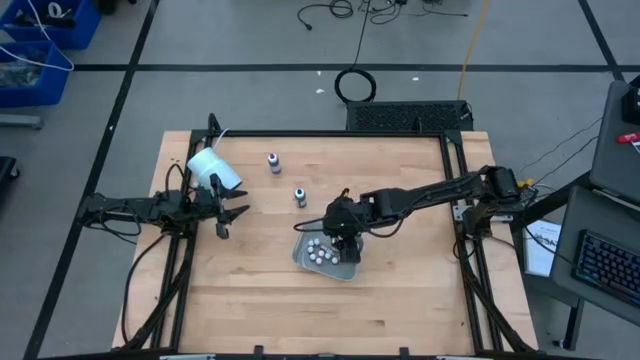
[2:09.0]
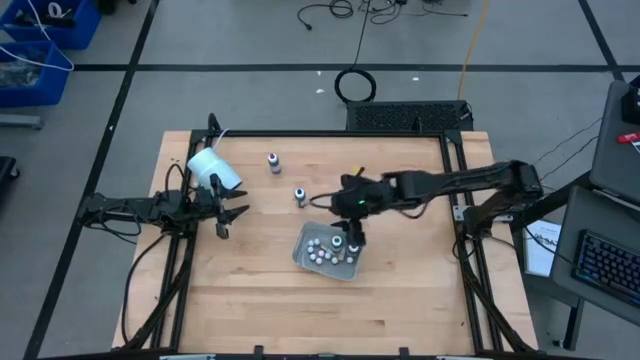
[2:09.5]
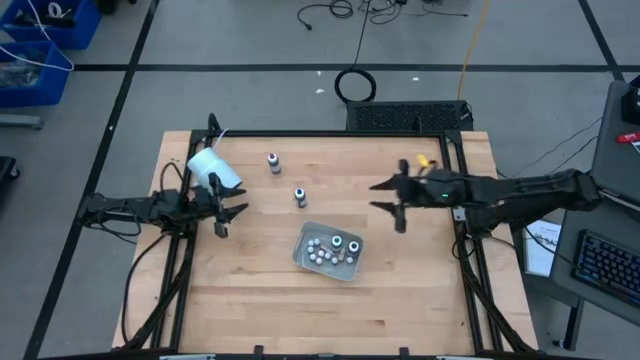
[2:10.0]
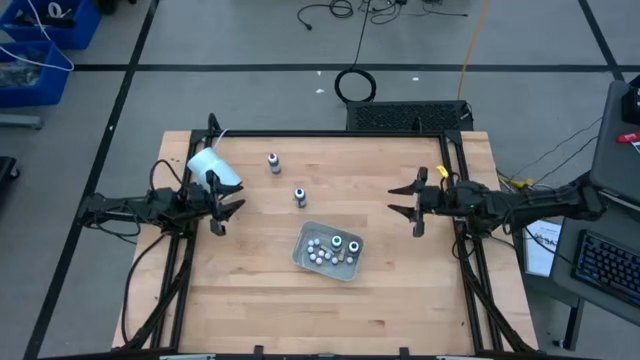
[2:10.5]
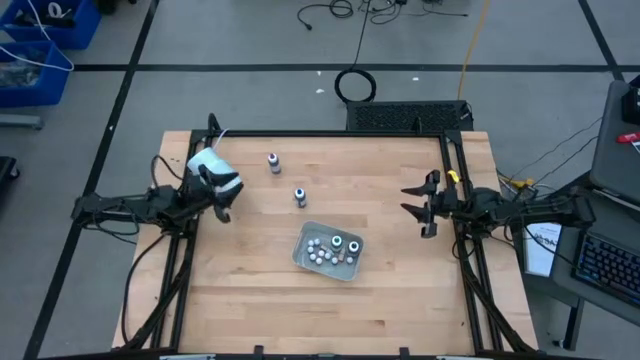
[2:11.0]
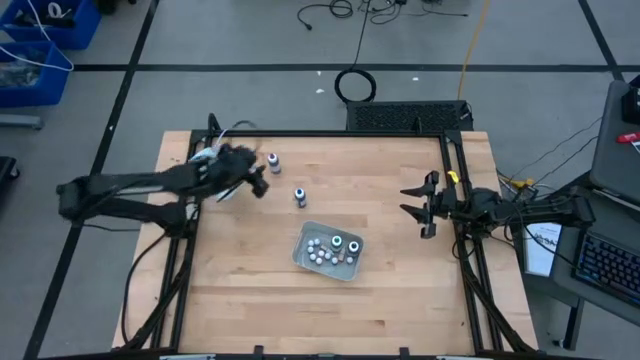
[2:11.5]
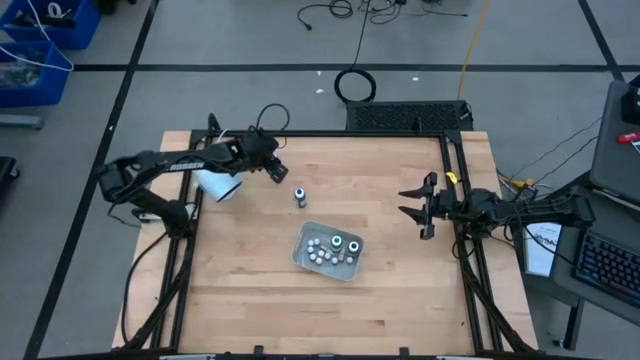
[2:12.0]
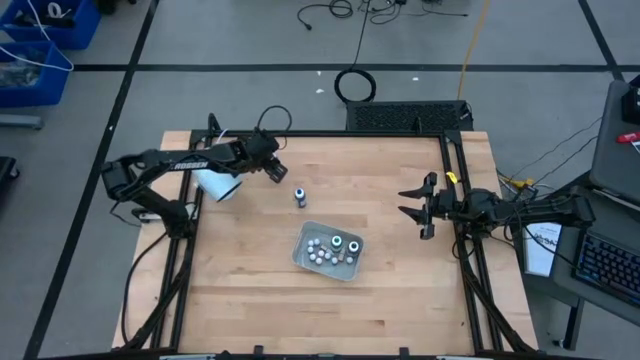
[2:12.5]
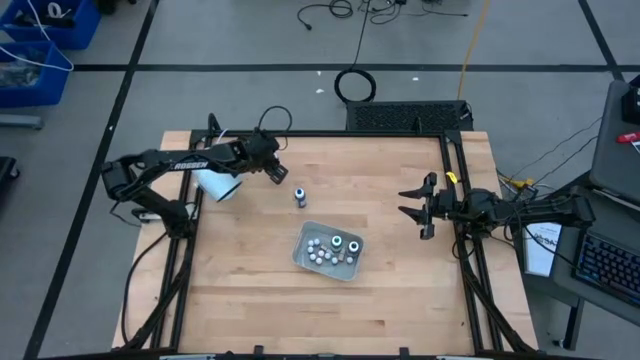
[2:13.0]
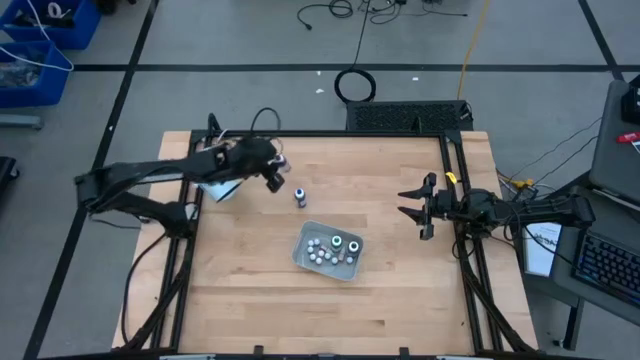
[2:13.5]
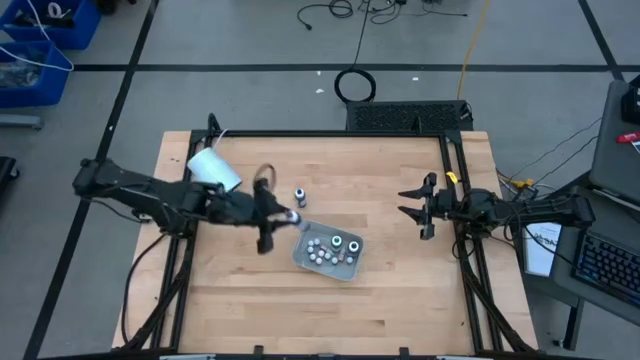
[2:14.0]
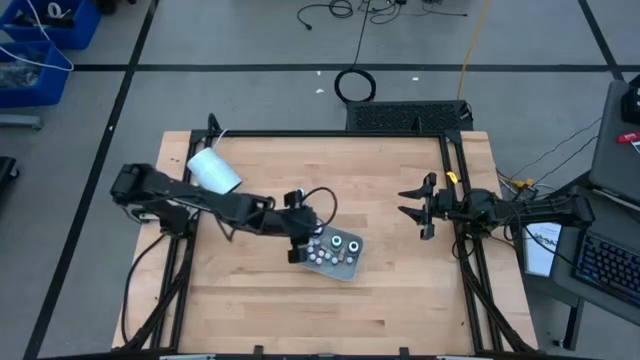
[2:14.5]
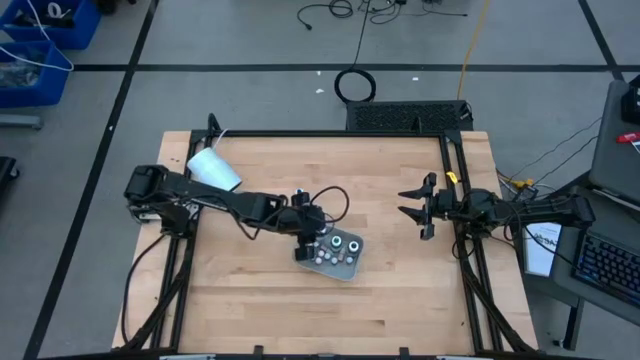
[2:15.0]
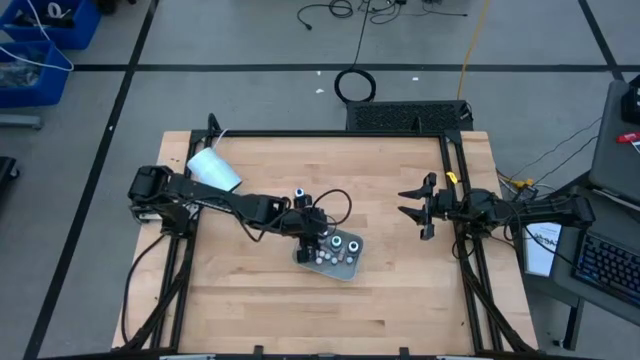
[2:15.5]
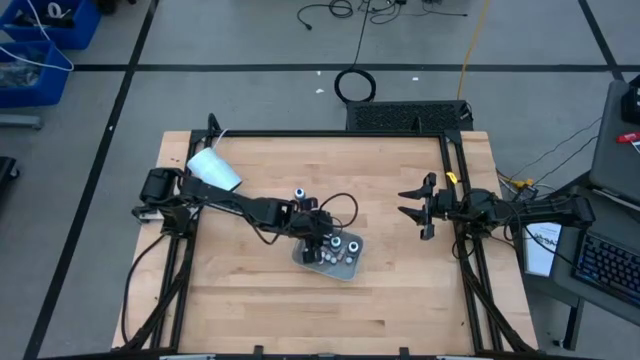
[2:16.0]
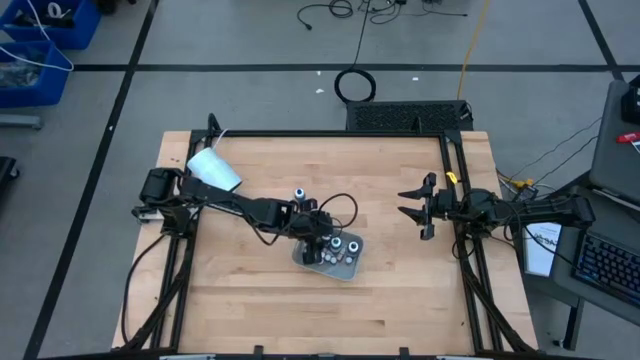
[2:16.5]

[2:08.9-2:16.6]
Task: Pick & Place food coloring
Put the purple food coloring bottle into the bin

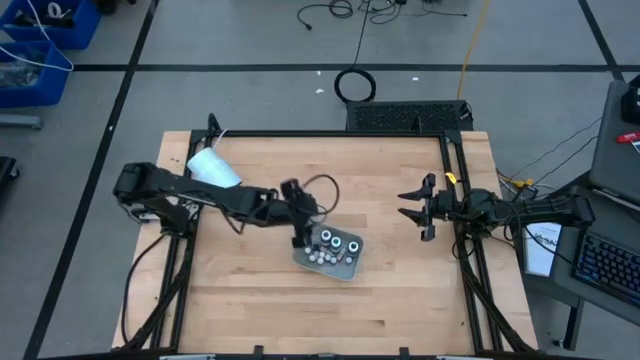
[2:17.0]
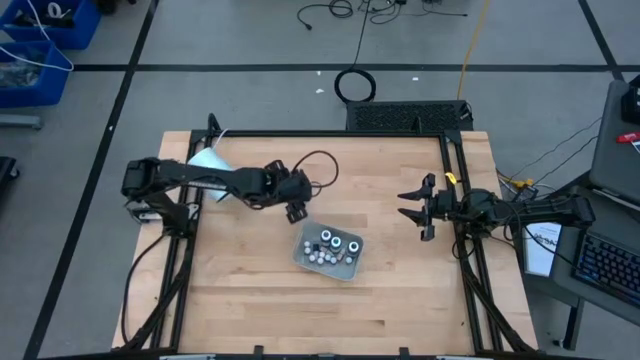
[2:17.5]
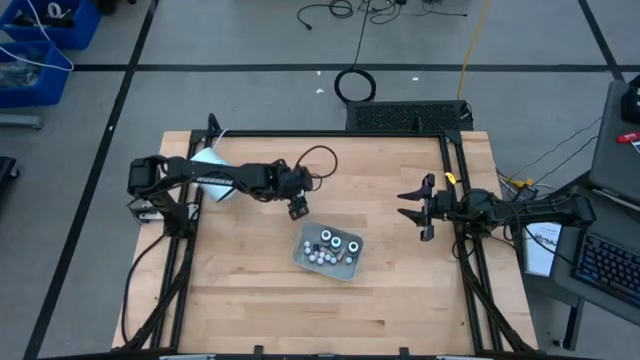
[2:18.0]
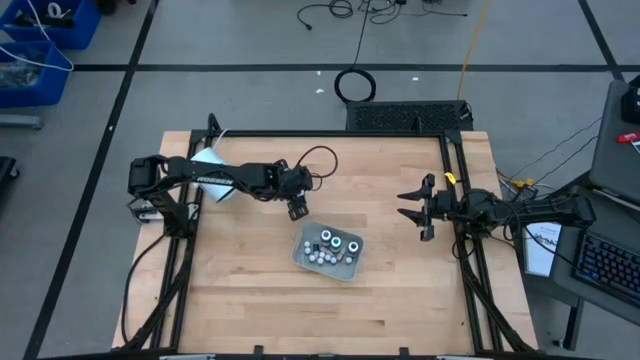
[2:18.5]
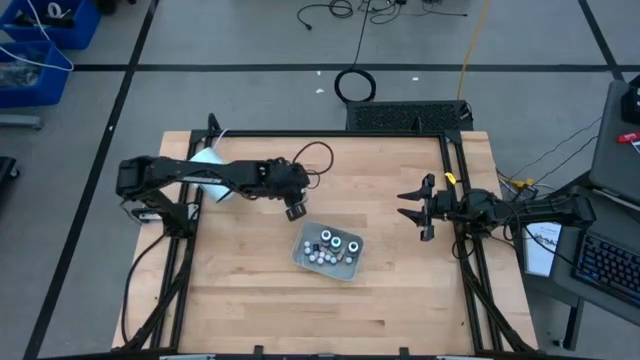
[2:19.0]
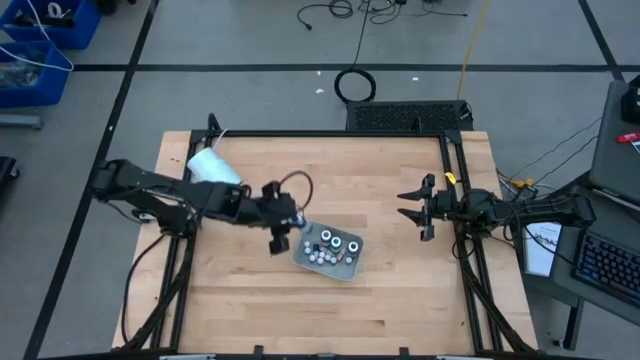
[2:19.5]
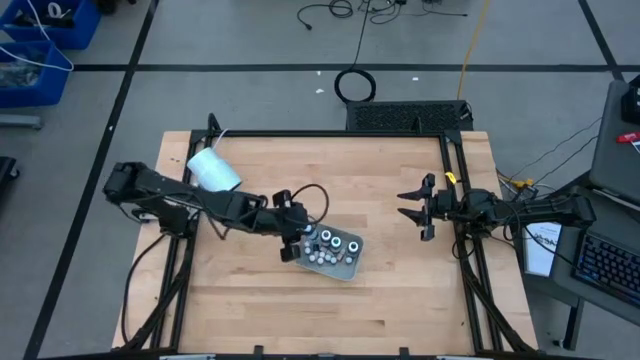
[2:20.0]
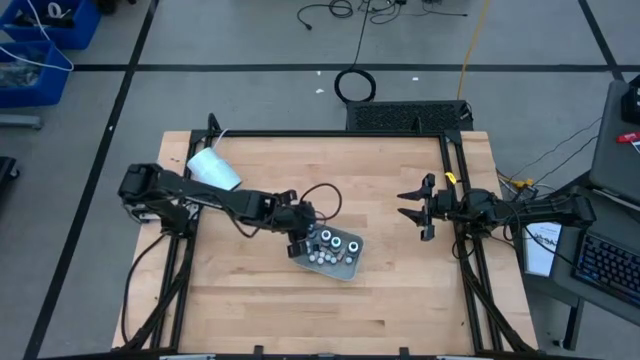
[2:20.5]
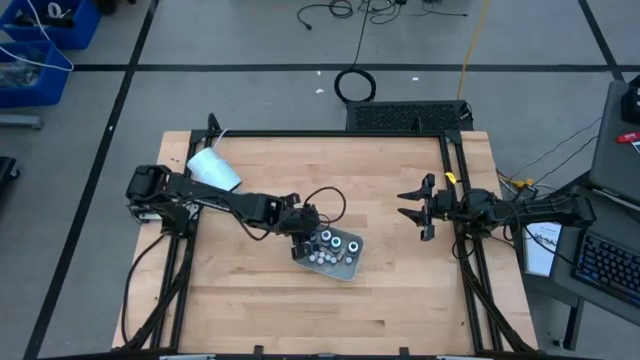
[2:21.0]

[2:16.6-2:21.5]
Put the blue food coloring bottle into the bin

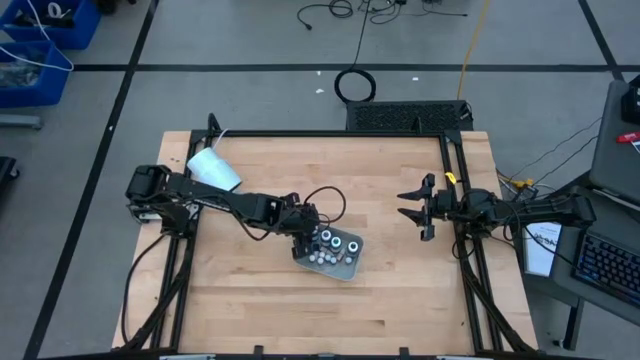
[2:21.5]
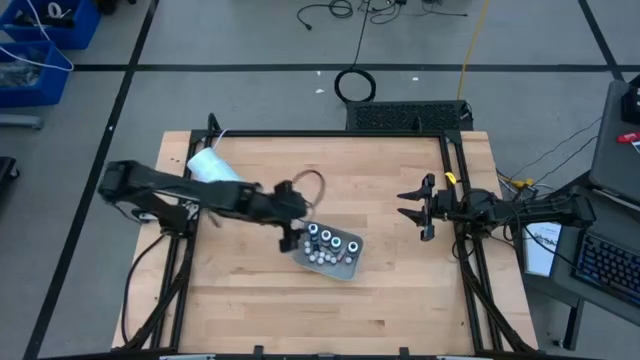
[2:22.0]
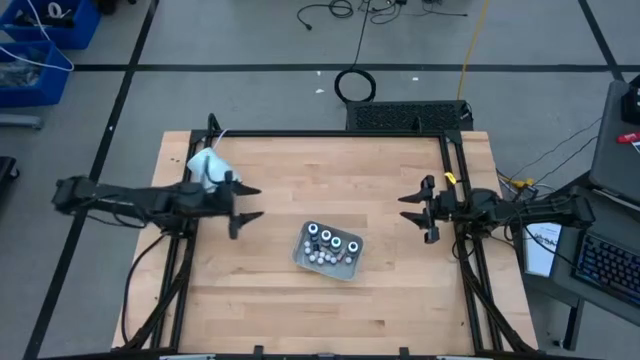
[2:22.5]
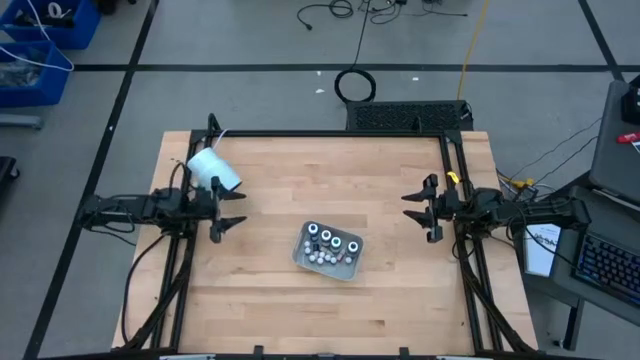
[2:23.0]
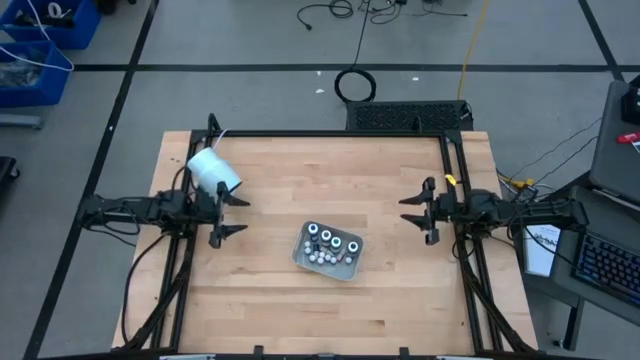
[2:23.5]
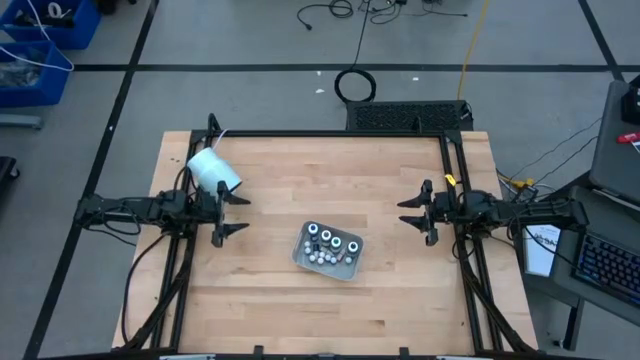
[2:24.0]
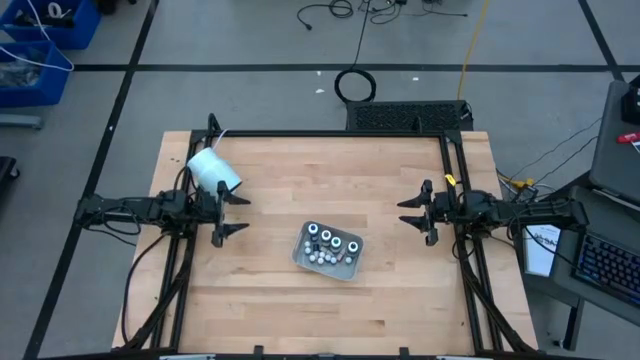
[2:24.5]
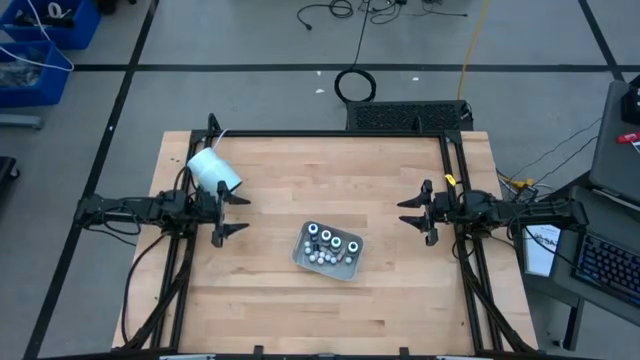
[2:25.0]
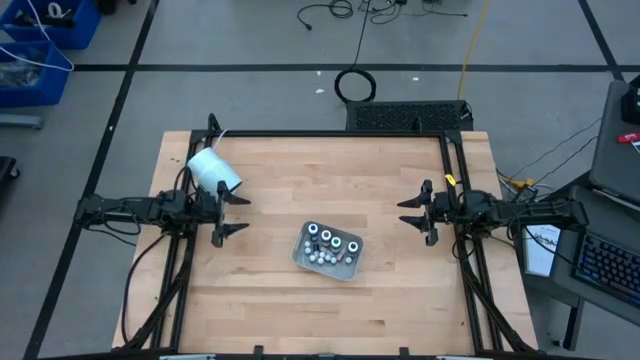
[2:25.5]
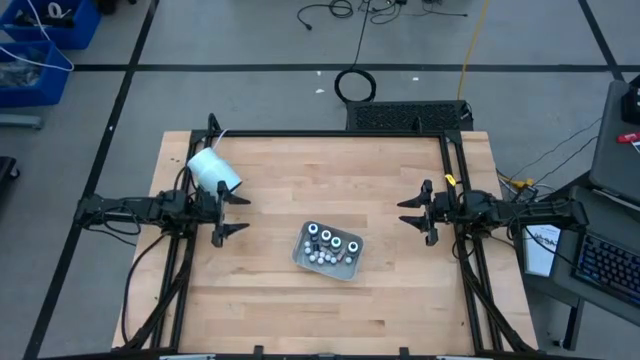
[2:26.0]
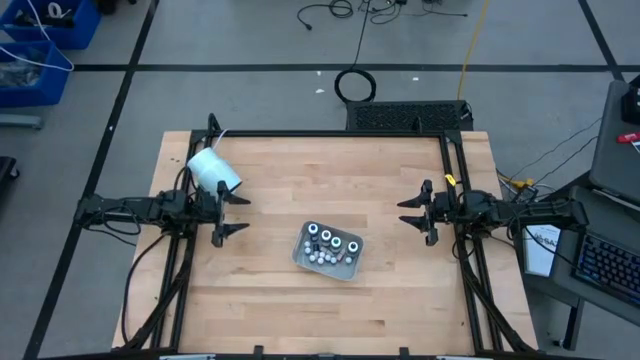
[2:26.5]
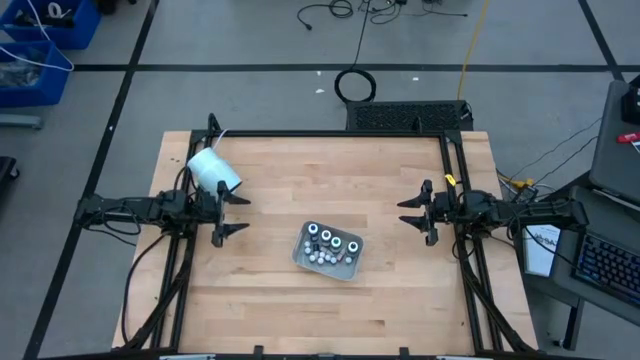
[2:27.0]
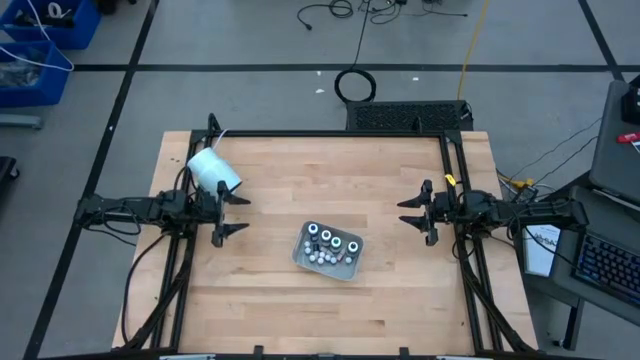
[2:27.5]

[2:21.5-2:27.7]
Return to Home Position

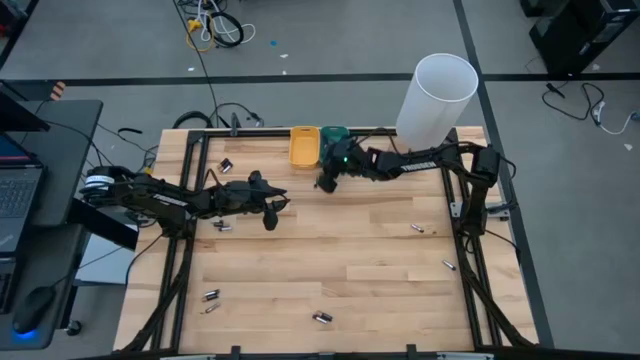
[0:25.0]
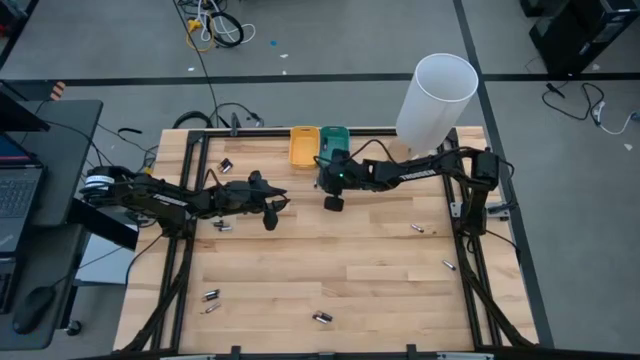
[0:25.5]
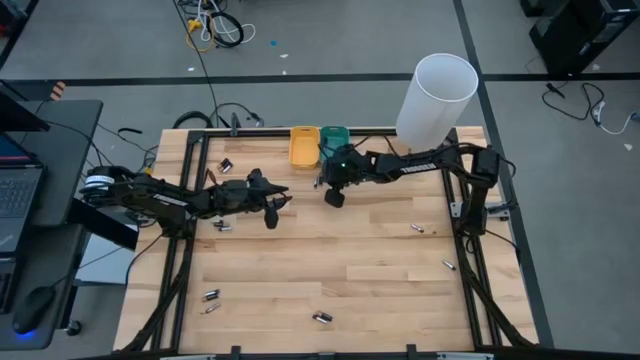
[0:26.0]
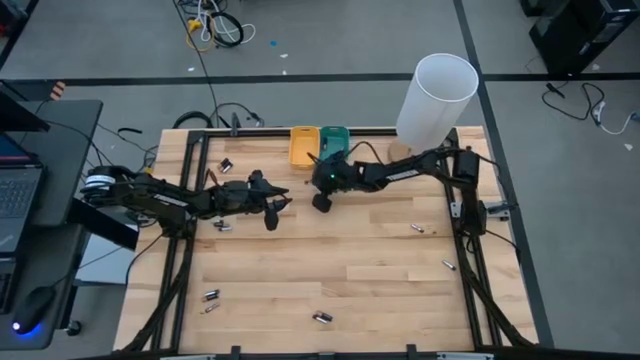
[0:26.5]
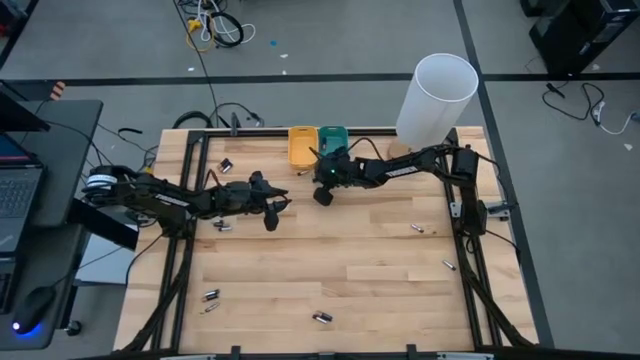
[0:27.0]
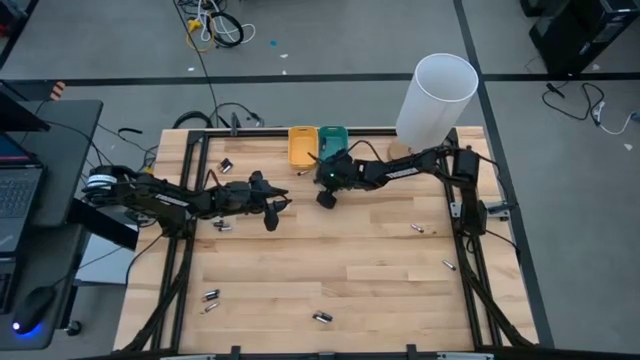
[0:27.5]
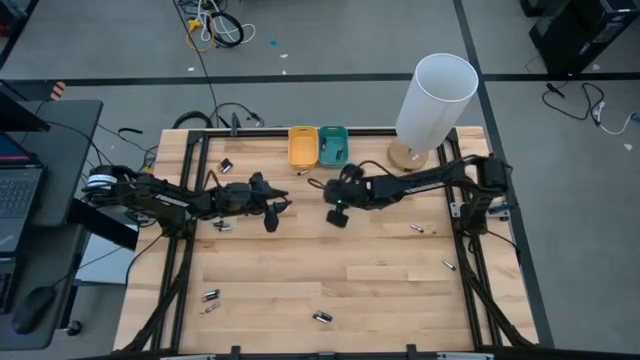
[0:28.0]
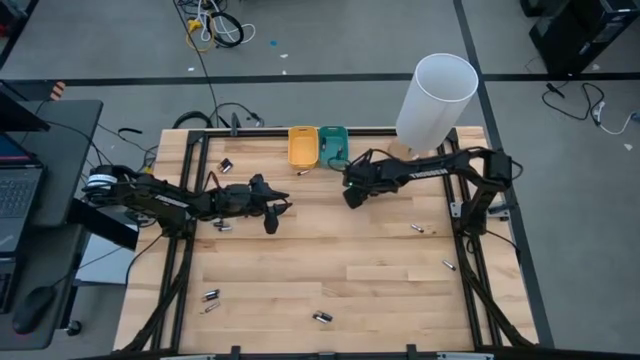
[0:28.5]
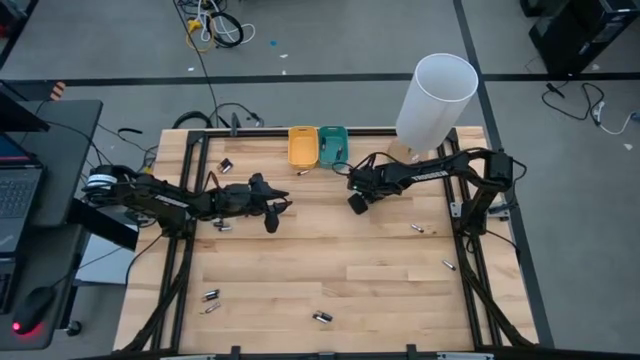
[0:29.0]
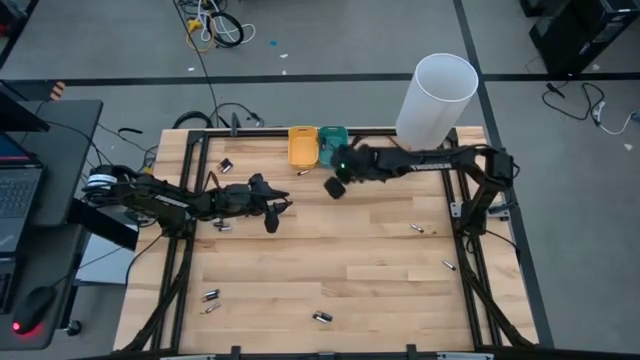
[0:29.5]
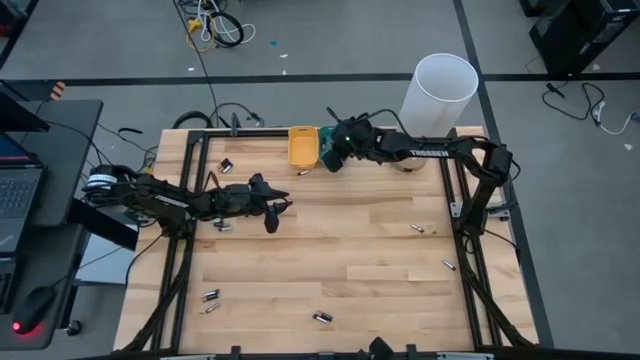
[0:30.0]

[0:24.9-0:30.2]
Task: Sort batteries
Put the black battery into the green bin
